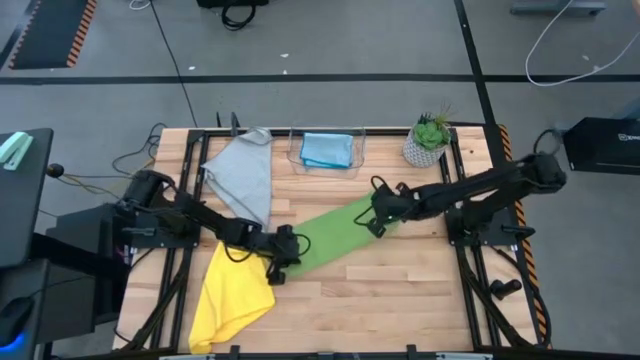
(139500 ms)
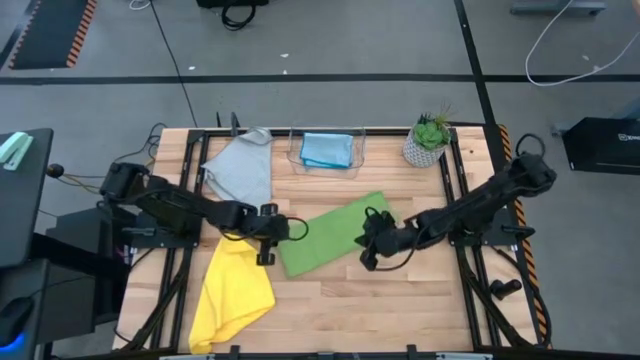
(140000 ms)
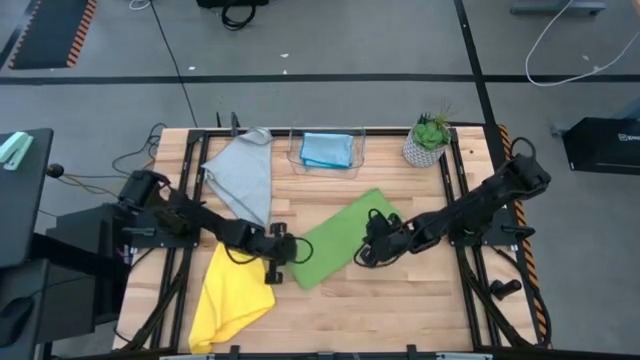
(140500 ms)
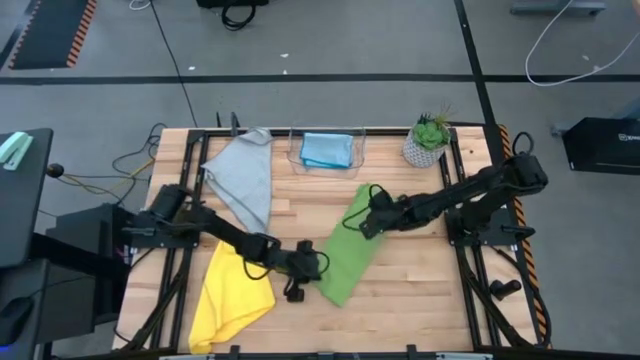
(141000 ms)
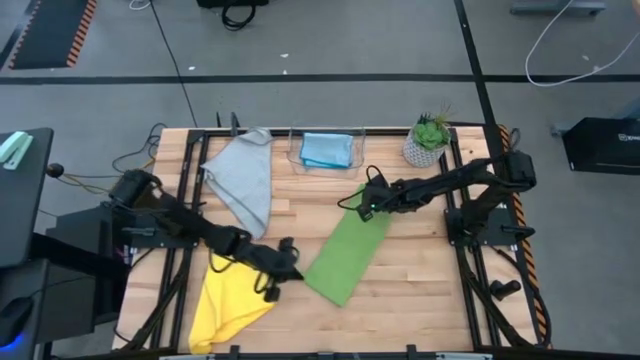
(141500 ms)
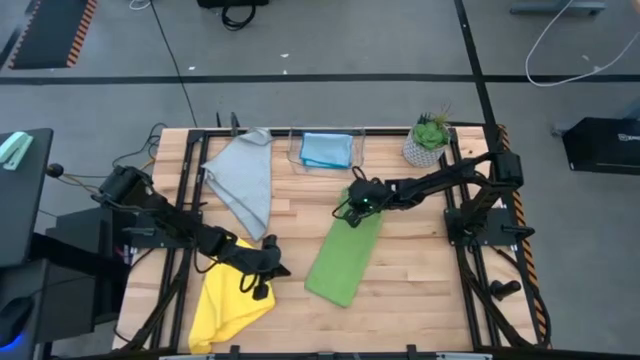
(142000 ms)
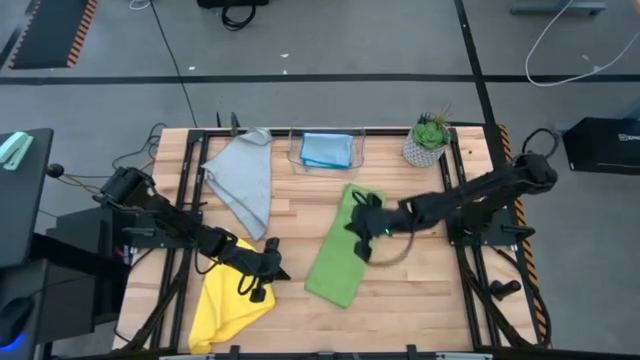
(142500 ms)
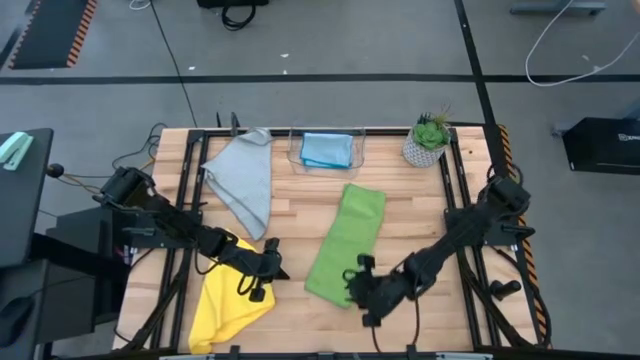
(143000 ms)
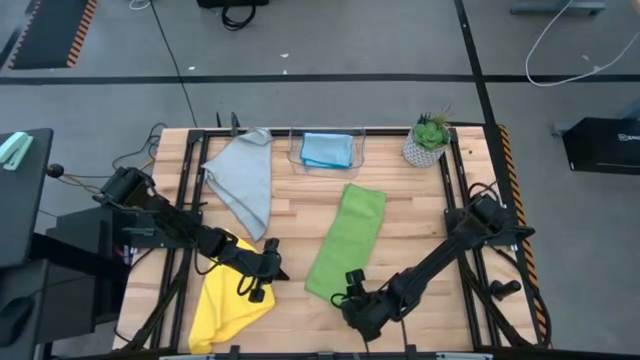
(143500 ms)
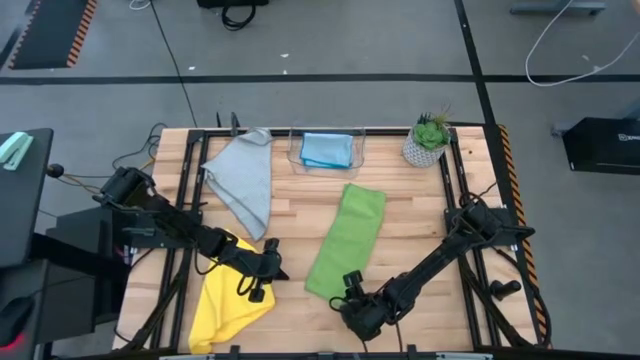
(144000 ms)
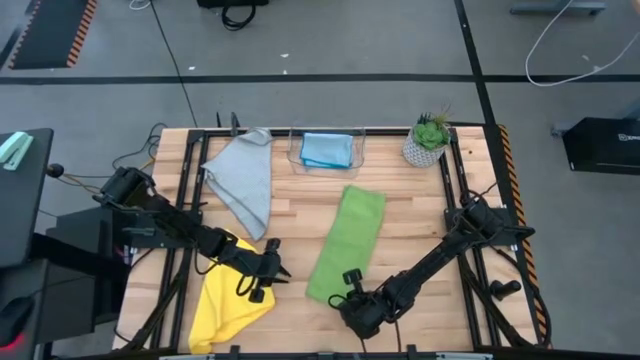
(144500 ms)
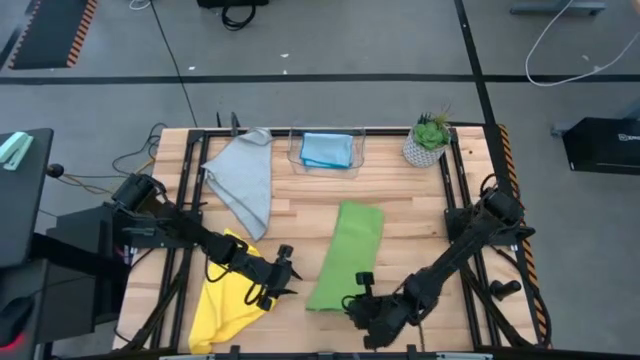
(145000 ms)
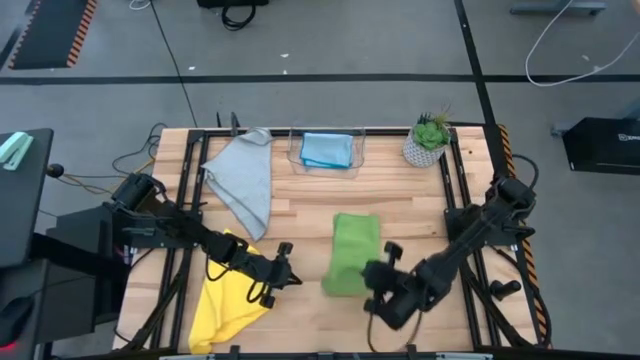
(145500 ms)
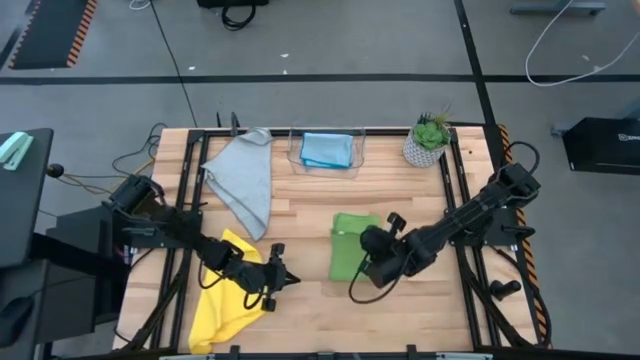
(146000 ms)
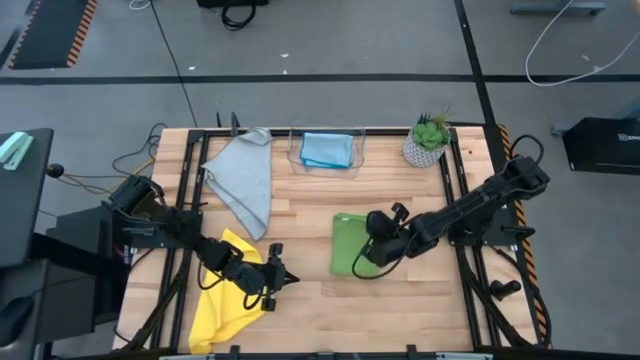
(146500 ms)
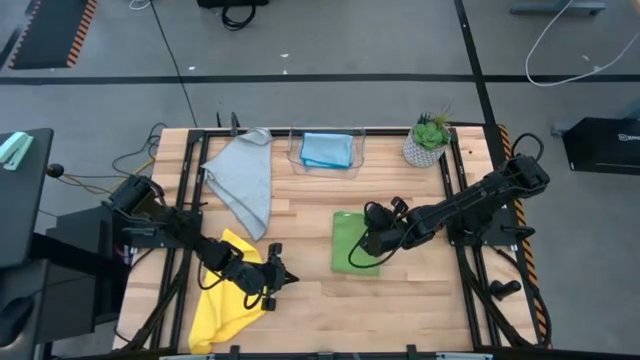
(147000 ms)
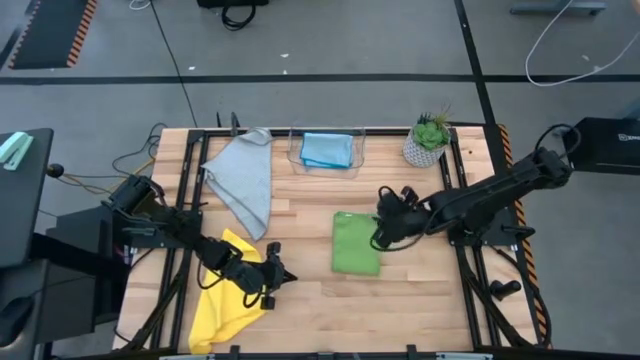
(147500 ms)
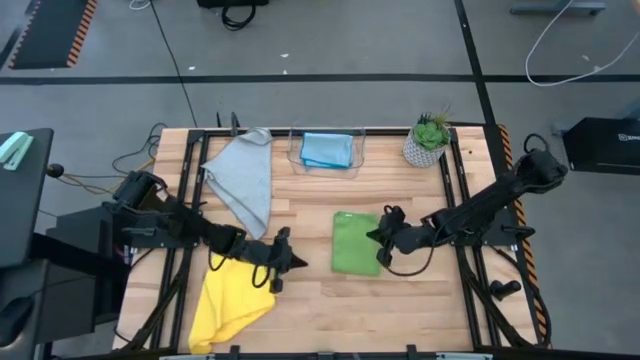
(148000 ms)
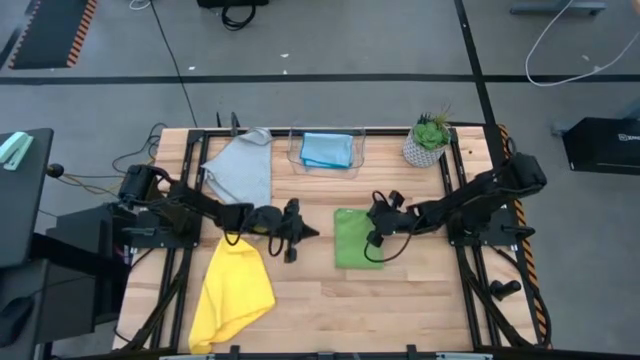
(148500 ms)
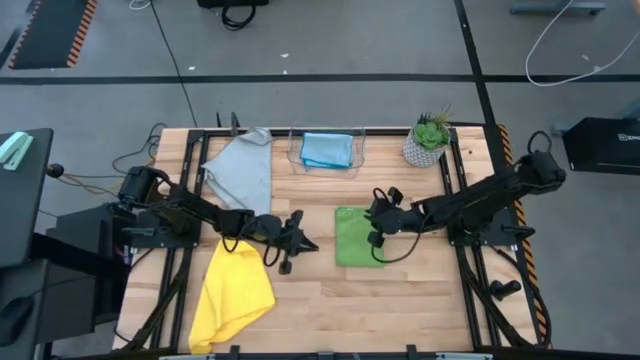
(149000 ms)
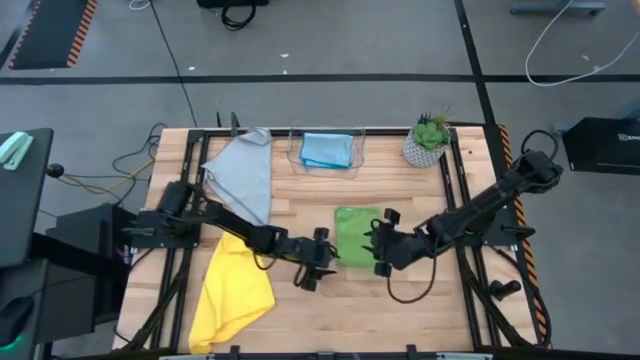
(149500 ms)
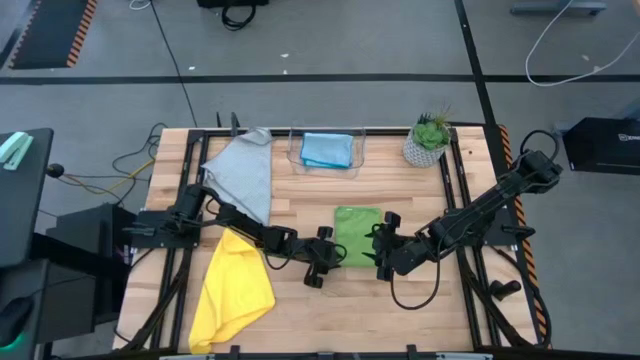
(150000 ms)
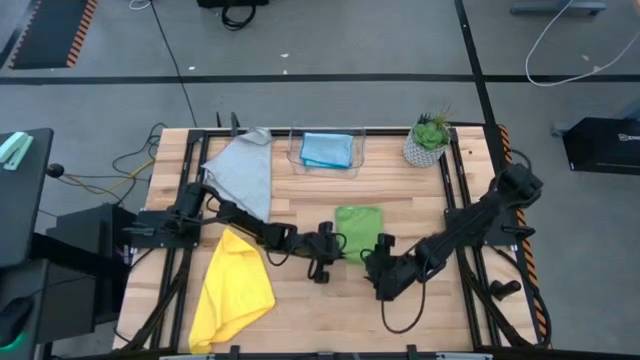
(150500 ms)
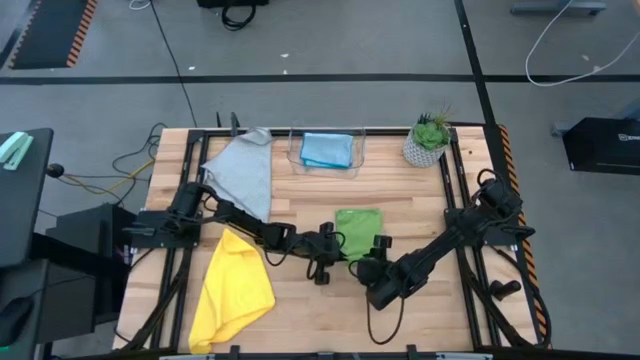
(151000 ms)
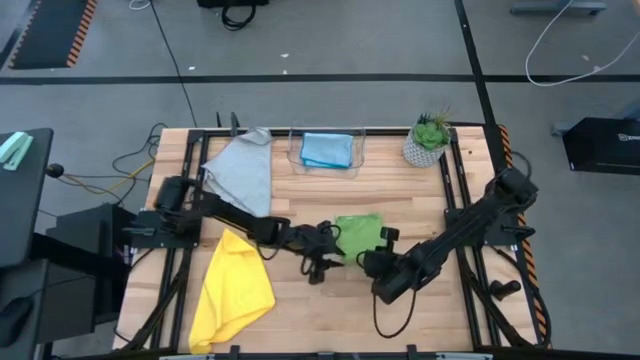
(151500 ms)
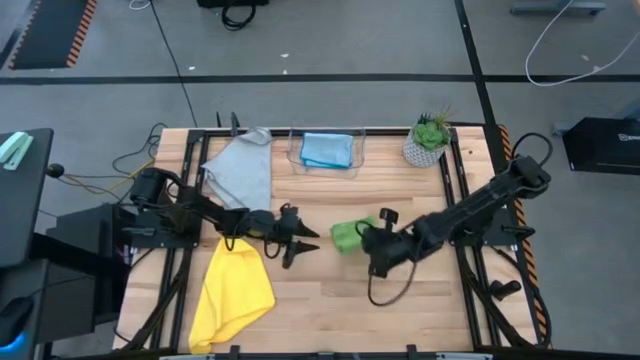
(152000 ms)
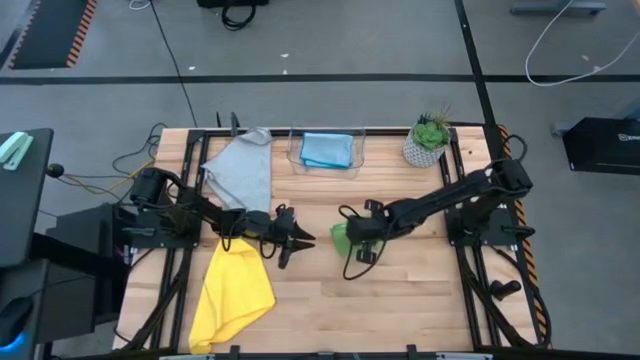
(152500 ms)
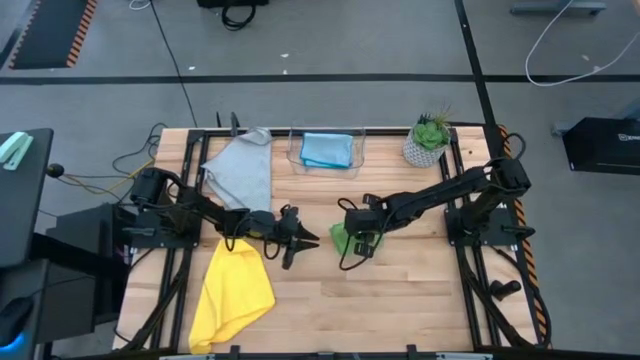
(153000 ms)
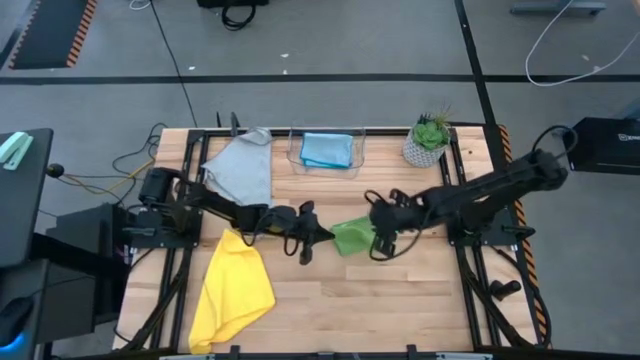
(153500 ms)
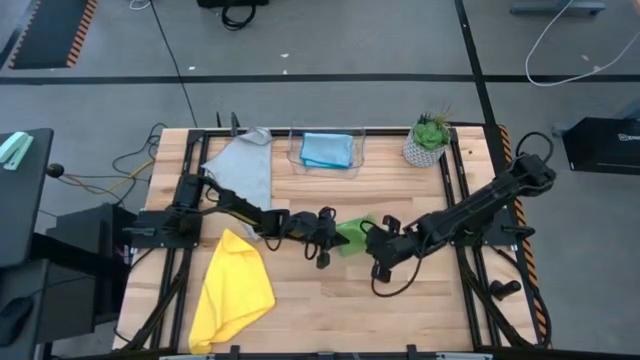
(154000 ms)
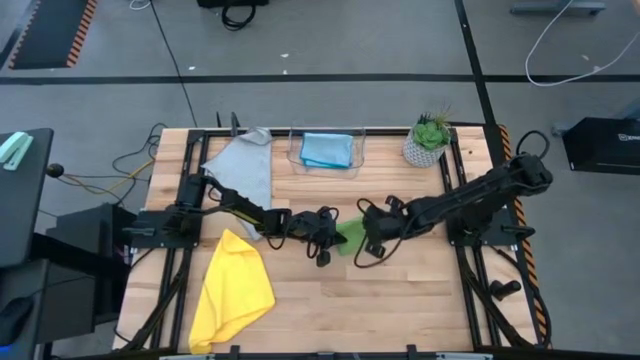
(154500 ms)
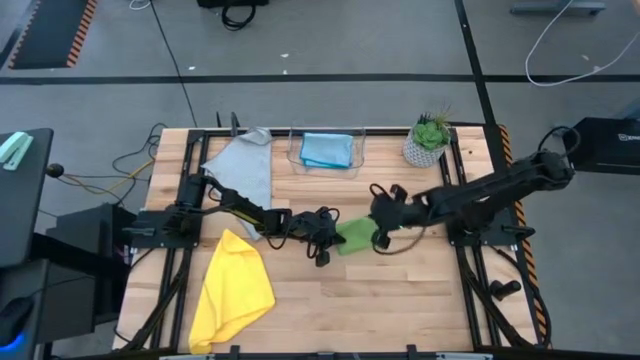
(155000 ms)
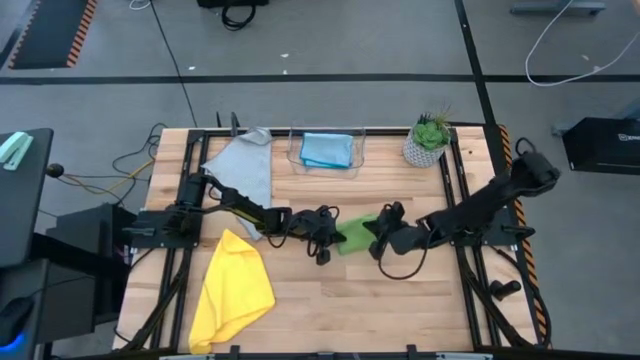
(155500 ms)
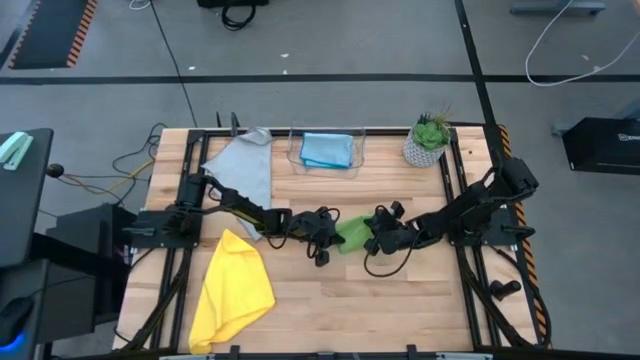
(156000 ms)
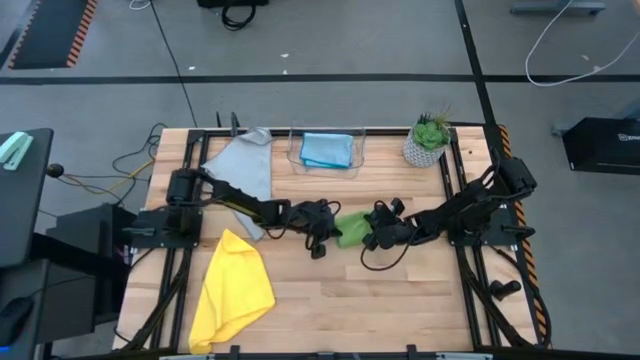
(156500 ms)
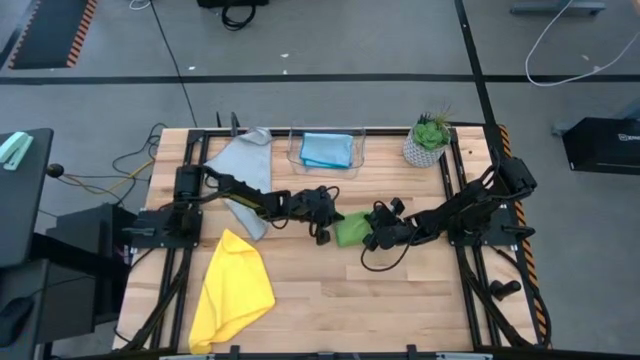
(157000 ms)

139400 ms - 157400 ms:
Task: Fold microfiber towels
Fold the green microfiber towel
